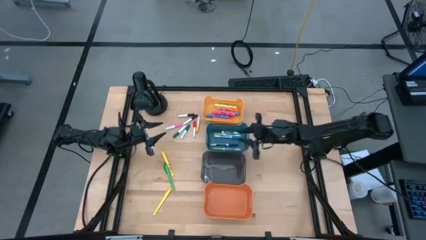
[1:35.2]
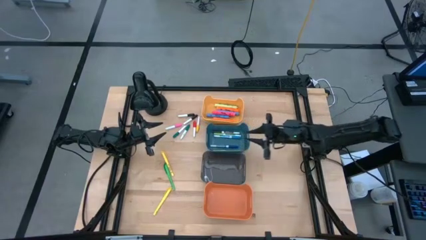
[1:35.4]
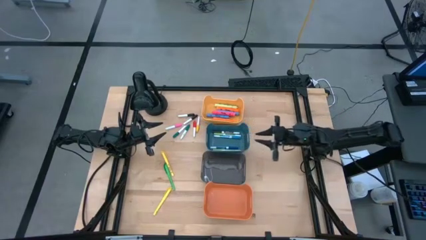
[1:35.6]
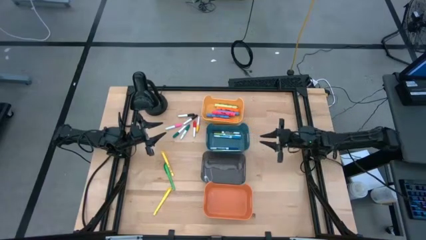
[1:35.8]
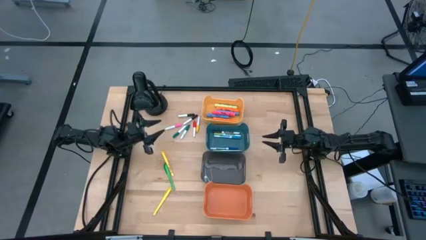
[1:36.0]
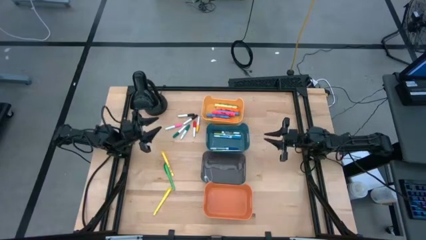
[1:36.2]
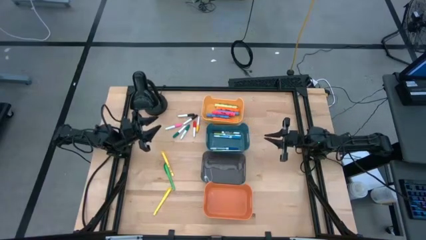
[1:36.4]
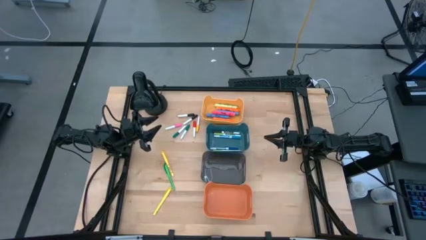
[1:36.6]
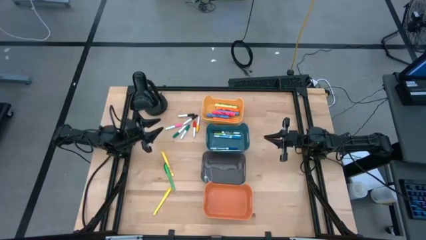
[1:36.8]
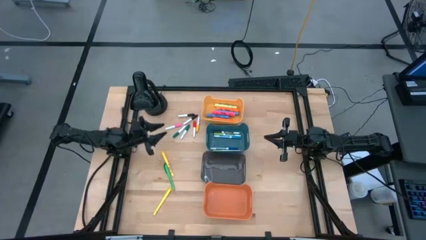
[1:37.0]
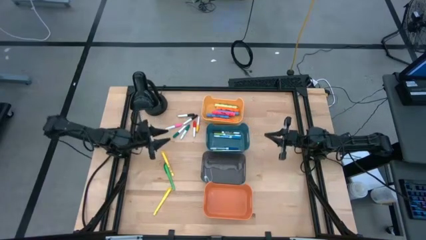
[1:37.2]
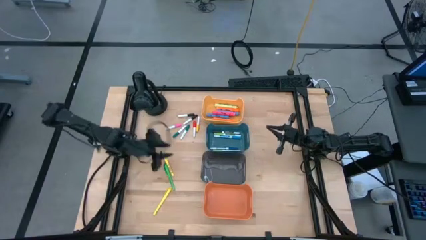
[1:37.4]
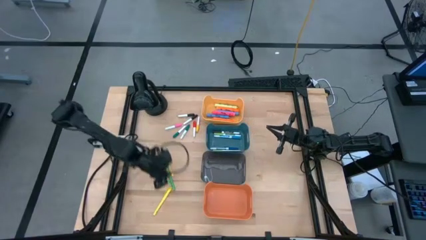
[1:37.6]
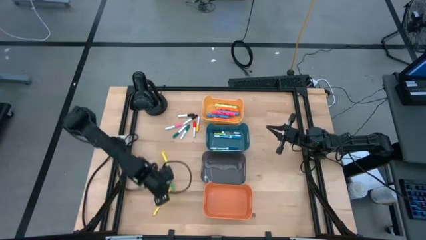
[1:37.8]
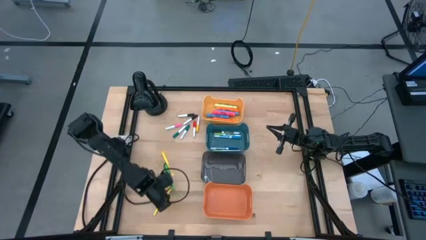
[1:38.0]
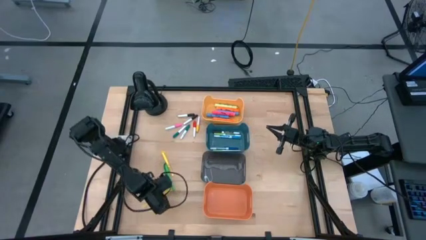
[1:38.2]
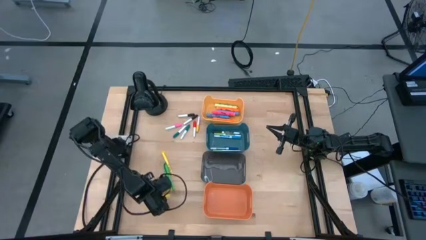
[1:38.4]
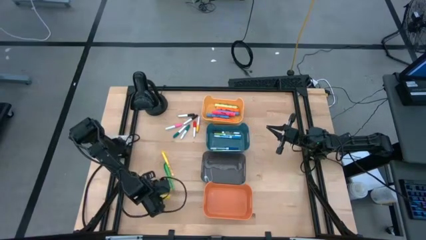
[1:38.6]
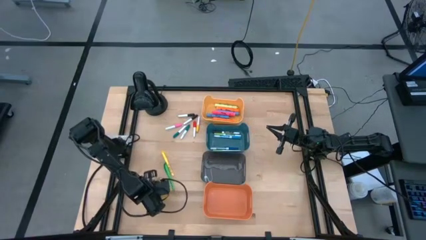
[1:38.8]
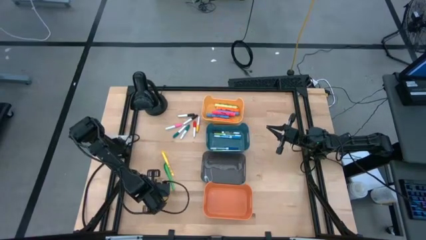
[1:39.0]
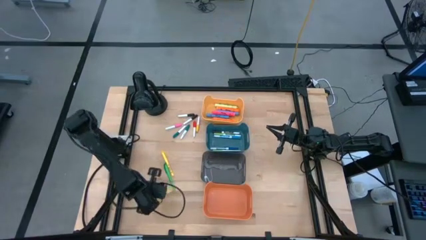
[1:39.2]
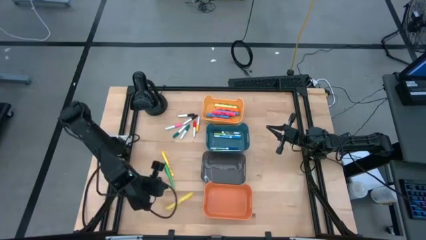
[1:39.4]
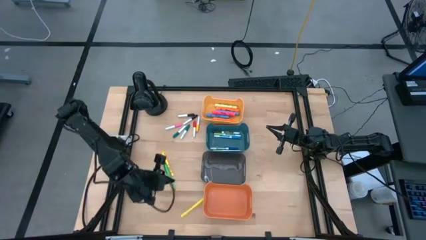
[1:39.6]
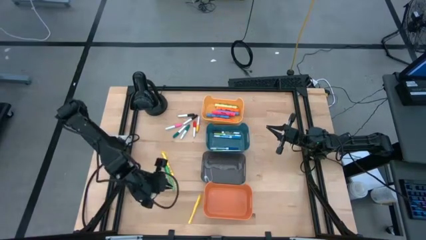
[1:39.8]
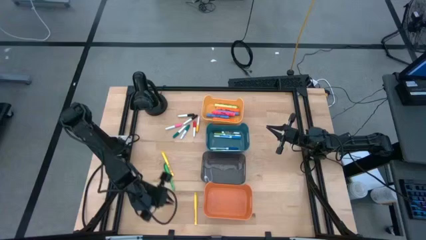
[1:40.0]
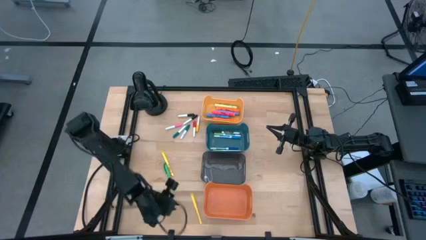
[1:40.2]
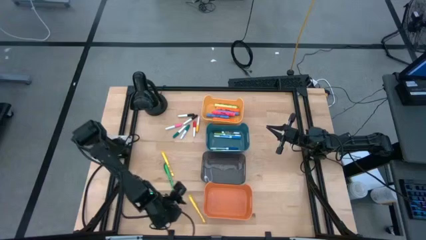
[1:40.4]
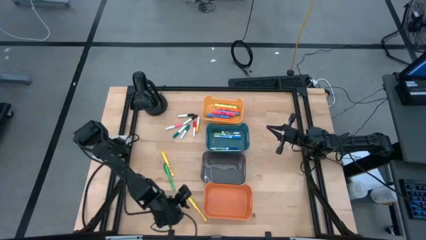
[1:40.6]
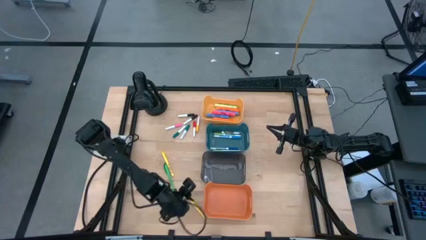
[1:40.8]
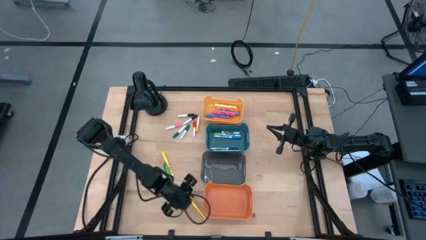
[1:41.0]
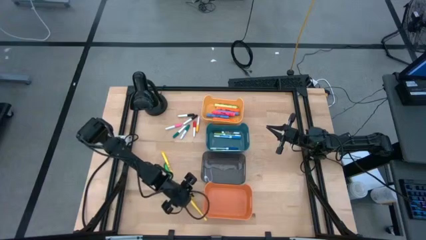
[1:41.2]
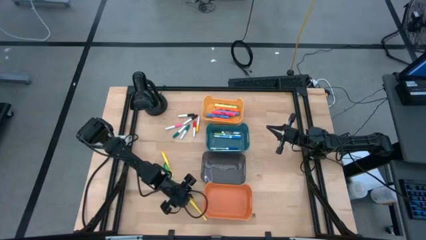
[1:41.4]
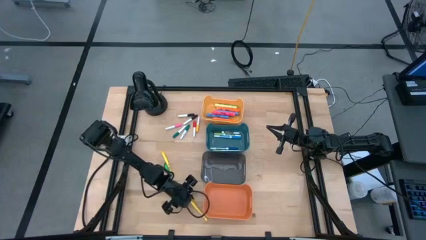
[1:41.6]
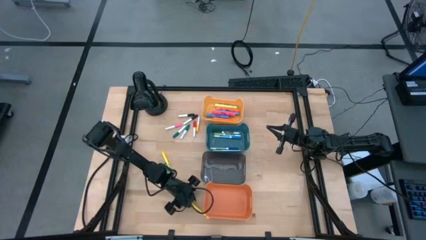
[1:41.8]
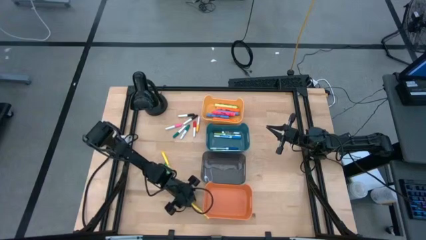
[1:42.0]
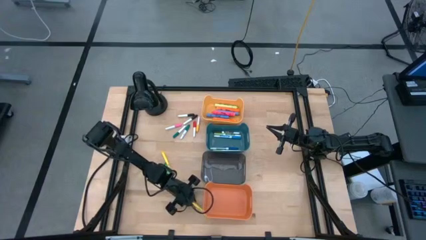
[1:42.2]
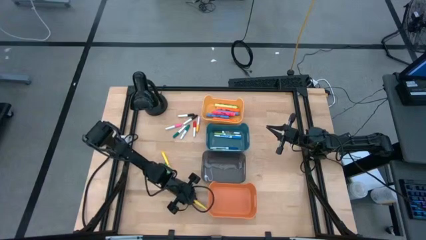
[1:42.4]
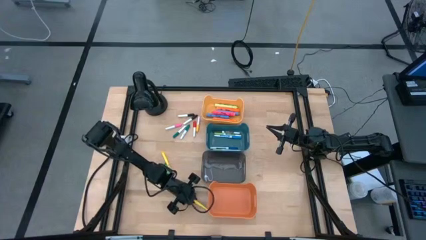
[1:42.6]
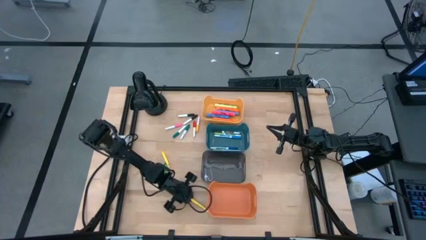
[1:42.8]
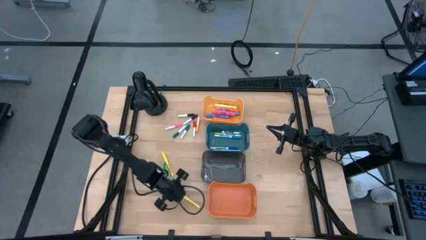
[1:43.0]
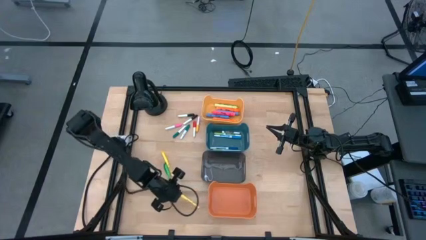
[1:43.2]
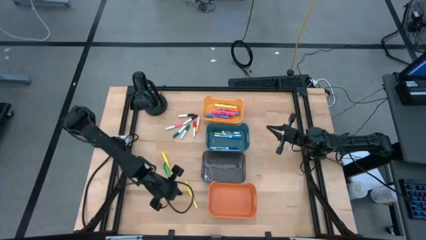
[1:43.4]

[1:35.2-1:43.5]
Task: Pick & Place Markers
Put the bottom yellow pen into the gray bin

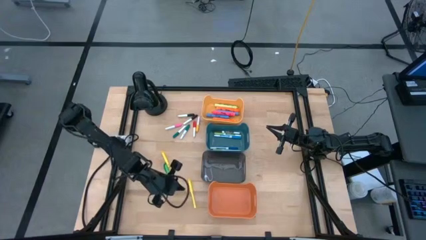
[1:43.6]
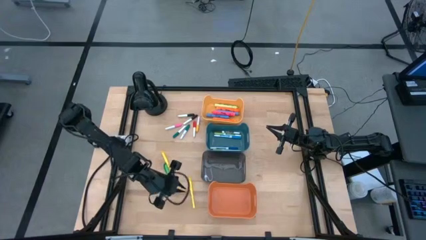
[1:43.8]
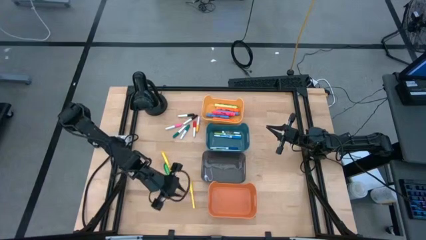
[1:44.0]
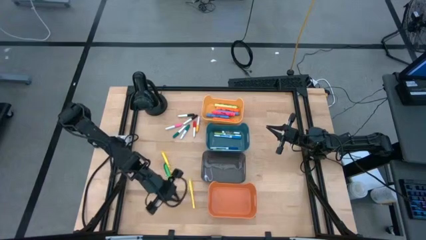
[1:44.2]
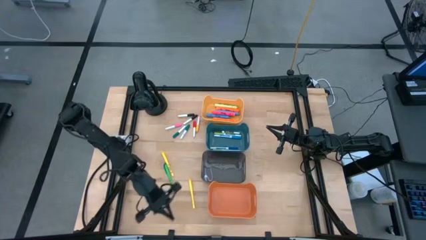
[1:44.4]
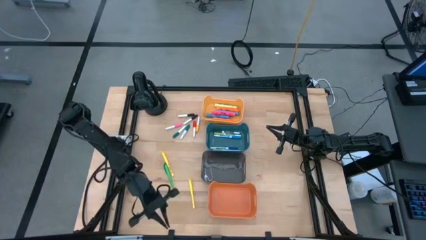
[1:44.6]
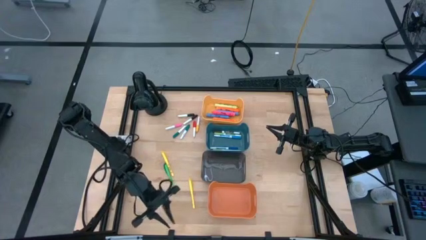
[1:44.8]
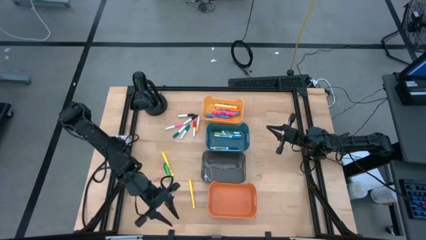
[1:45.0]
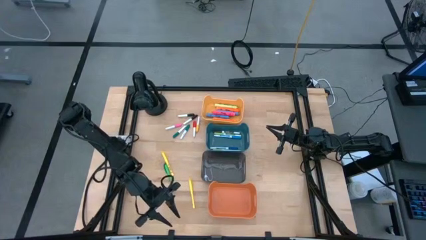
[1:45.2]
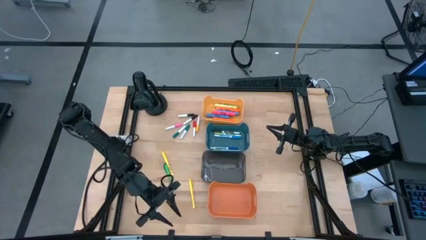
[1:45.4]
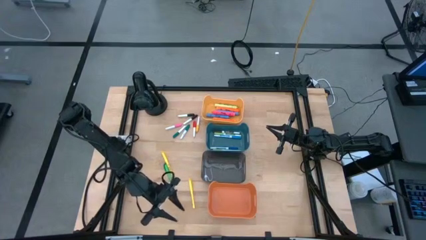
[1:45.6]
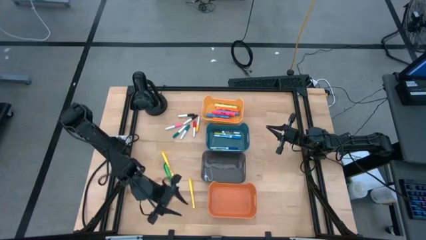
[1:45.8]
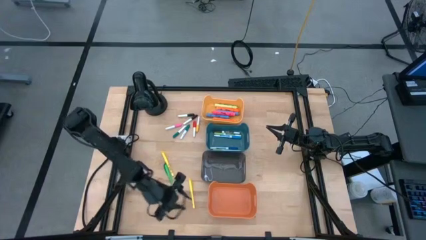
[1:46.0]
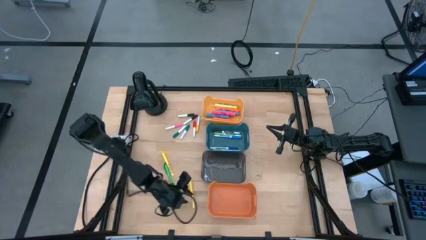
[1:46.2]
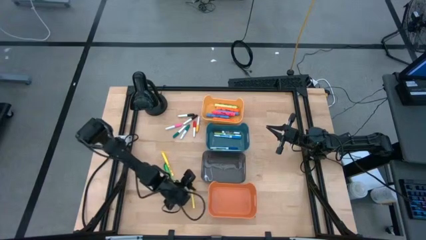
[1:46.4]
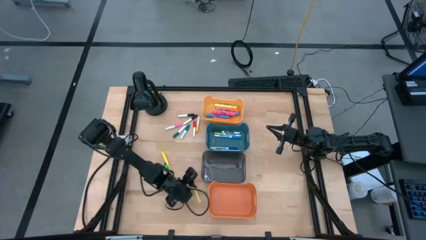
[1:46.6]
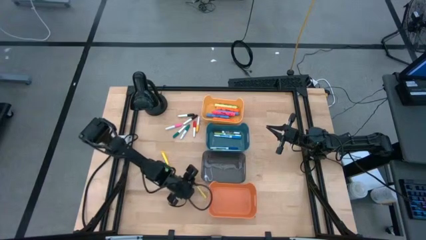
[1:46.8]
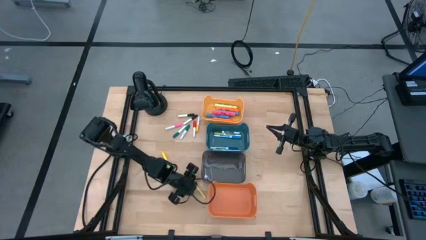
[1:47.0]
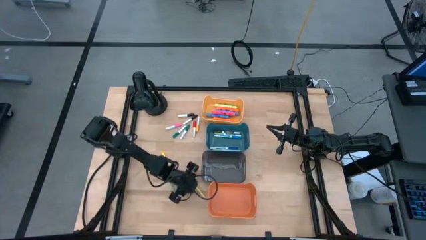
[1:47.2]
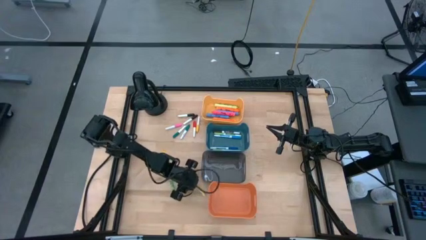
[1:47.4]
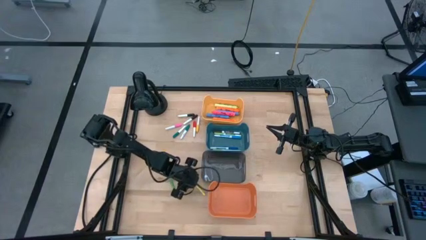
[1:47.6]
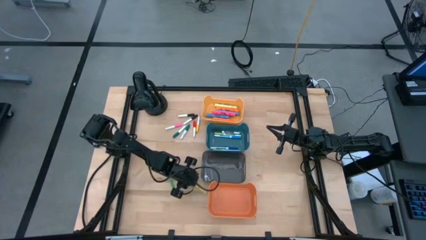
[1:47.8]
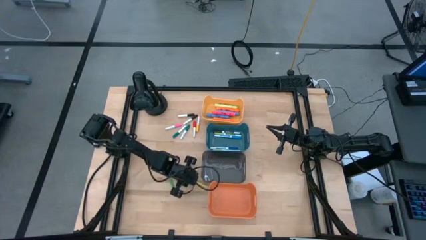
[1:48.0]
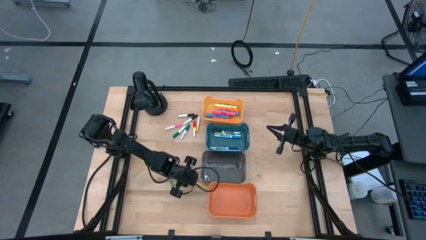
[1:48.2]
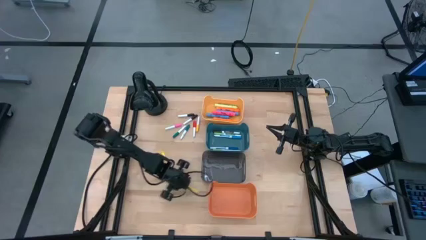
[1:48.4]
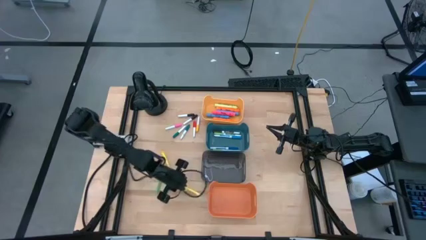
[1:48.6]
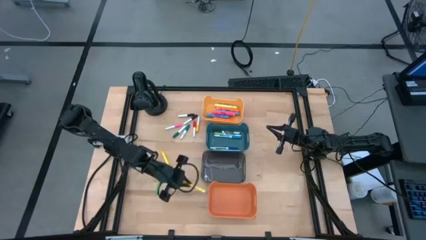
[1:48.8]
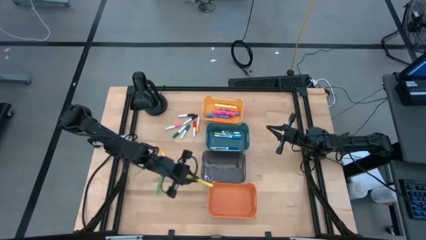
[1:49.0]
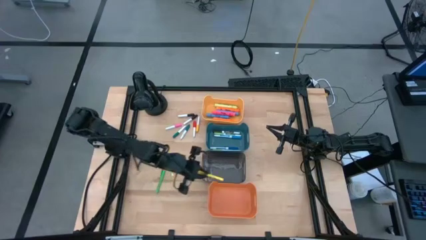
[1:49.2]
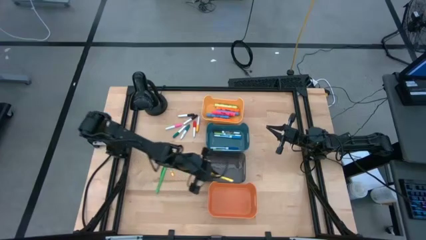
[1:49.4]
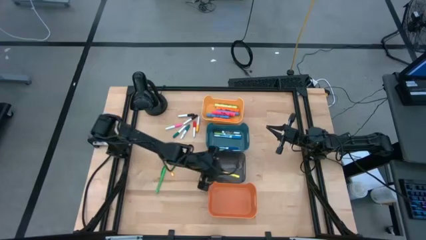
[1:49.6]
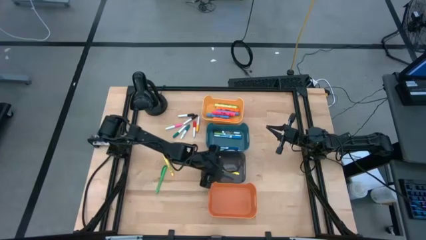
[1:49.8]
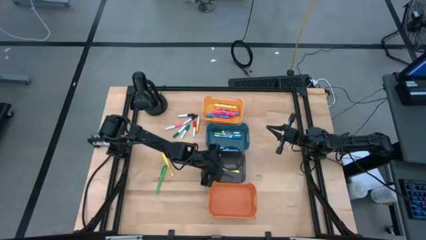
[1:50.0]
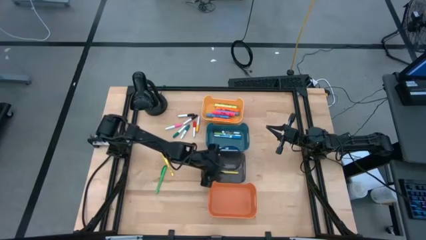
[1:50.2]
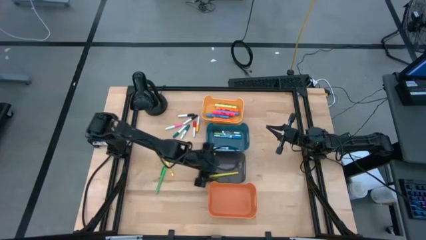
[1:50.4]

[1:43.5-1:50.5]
Put the bottom yellow pen into the gray bin
